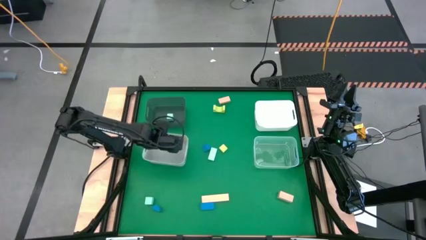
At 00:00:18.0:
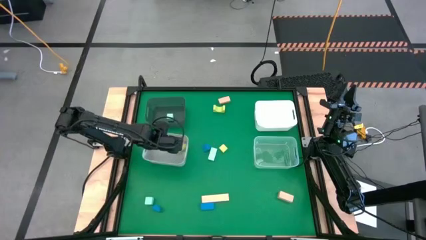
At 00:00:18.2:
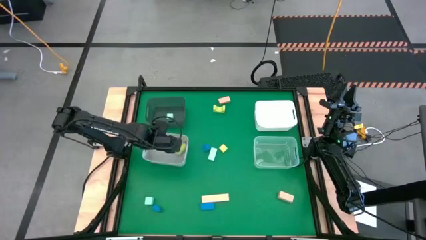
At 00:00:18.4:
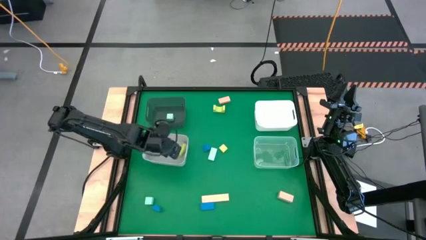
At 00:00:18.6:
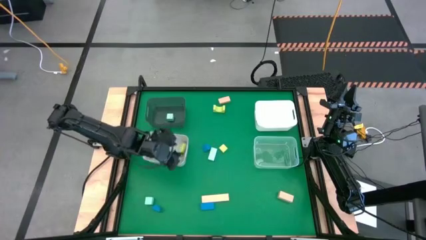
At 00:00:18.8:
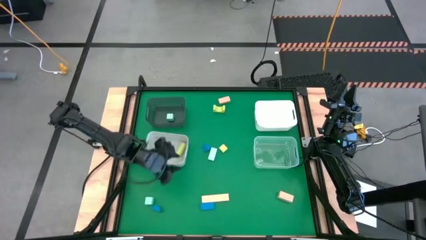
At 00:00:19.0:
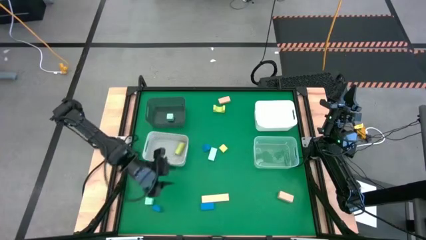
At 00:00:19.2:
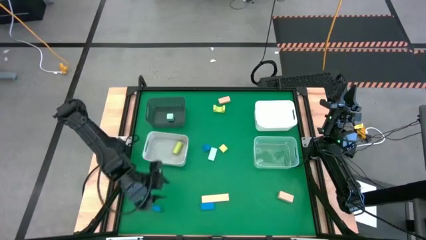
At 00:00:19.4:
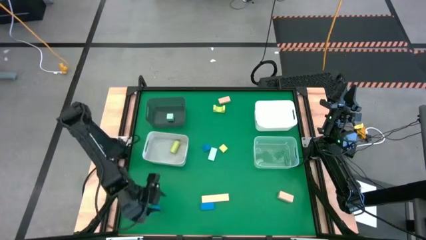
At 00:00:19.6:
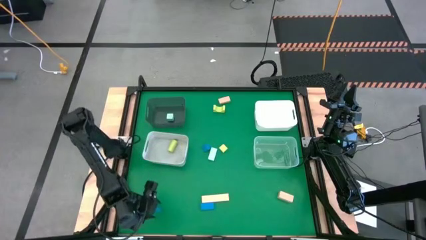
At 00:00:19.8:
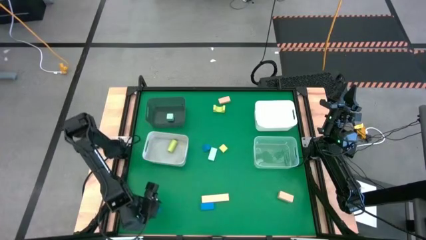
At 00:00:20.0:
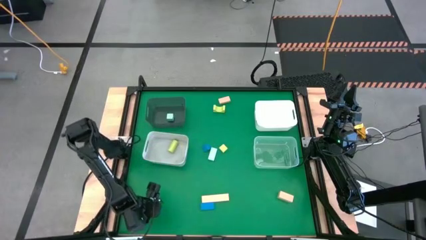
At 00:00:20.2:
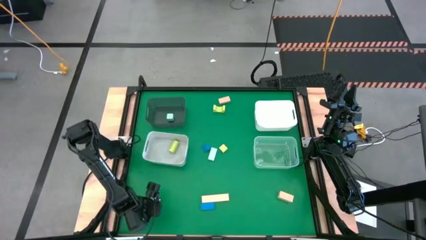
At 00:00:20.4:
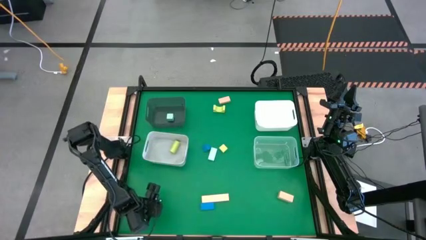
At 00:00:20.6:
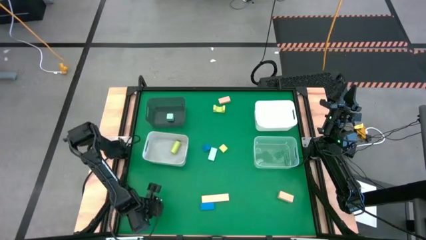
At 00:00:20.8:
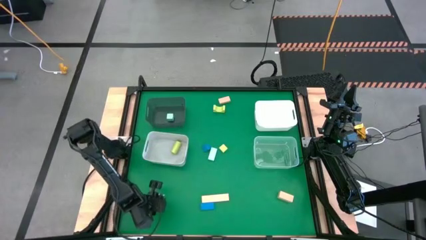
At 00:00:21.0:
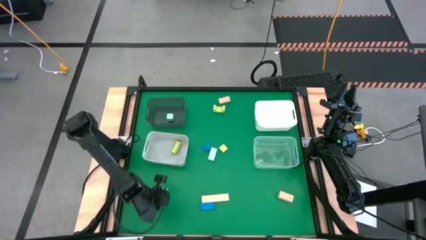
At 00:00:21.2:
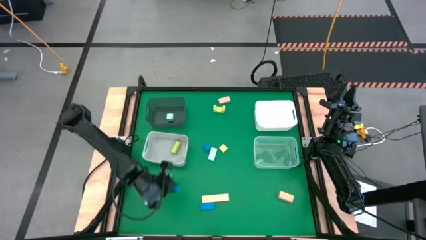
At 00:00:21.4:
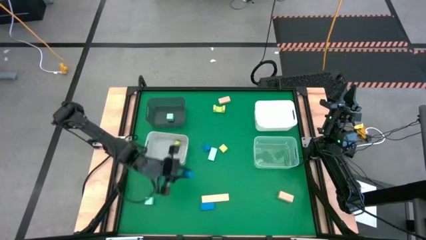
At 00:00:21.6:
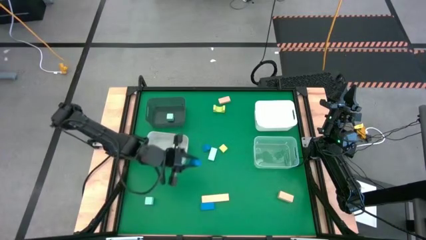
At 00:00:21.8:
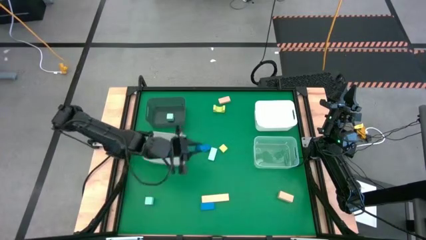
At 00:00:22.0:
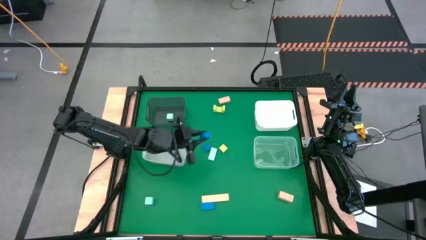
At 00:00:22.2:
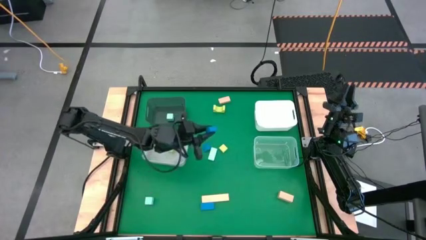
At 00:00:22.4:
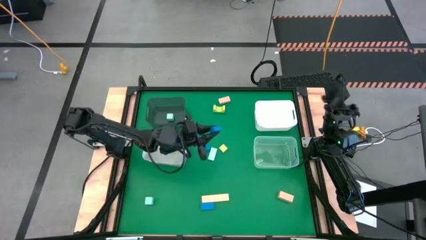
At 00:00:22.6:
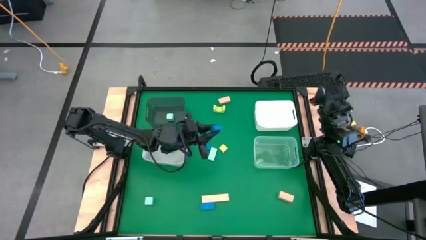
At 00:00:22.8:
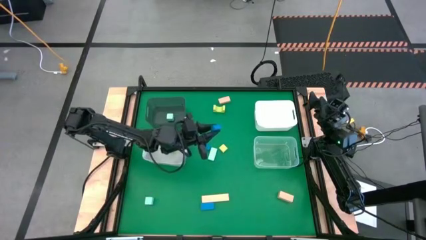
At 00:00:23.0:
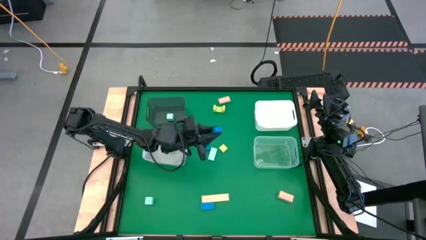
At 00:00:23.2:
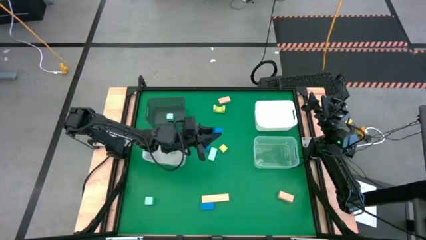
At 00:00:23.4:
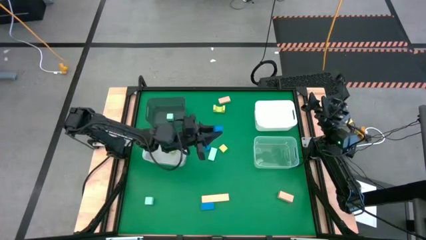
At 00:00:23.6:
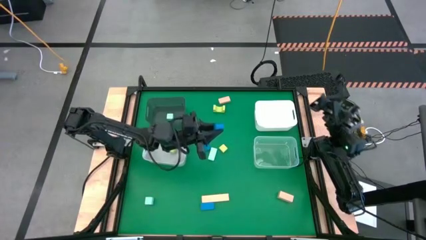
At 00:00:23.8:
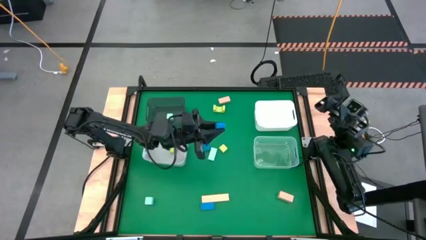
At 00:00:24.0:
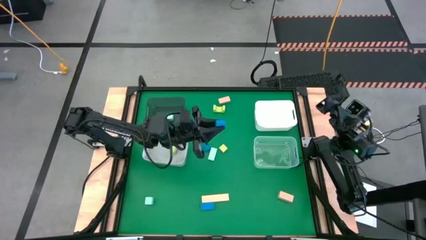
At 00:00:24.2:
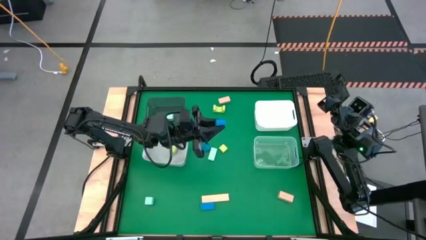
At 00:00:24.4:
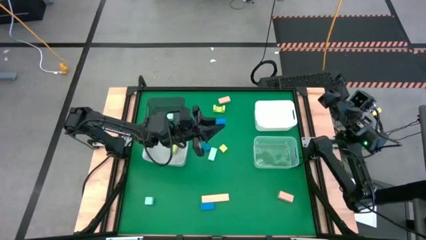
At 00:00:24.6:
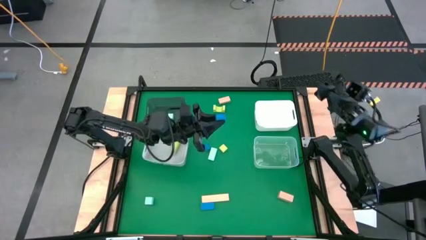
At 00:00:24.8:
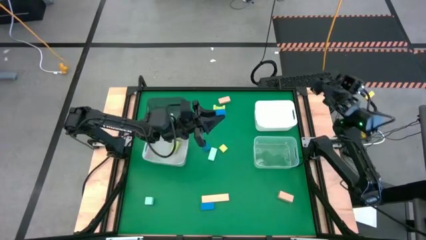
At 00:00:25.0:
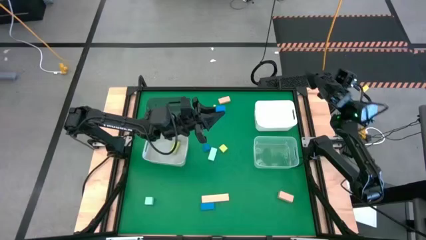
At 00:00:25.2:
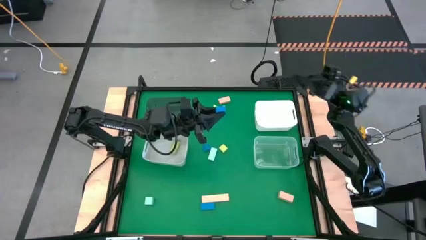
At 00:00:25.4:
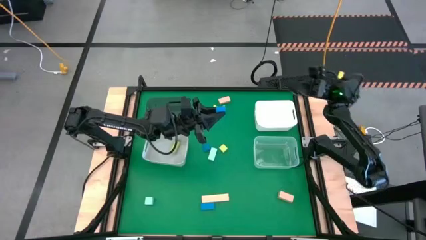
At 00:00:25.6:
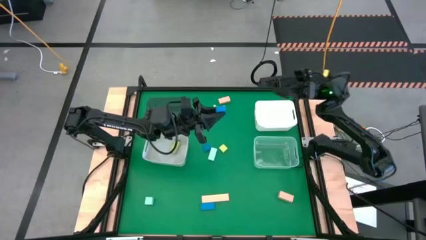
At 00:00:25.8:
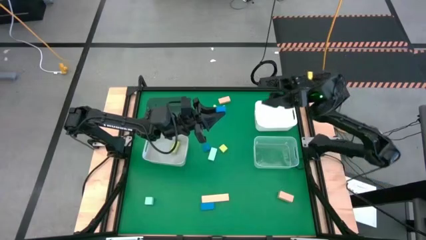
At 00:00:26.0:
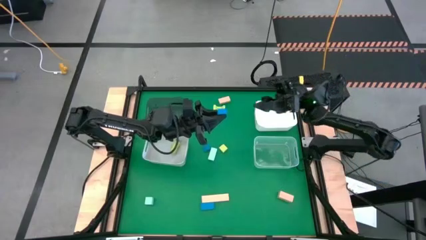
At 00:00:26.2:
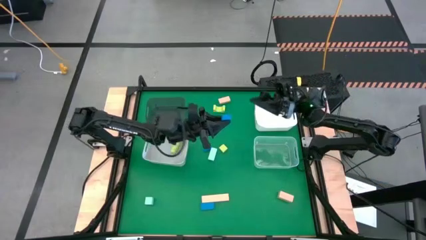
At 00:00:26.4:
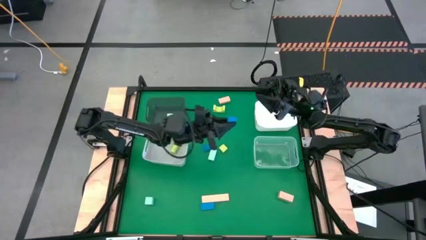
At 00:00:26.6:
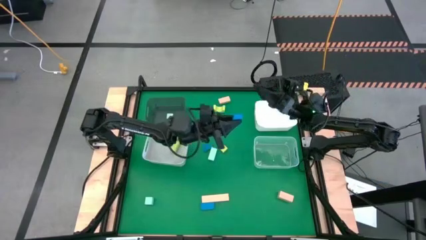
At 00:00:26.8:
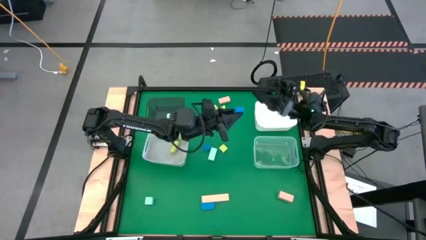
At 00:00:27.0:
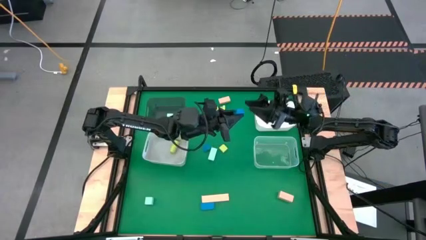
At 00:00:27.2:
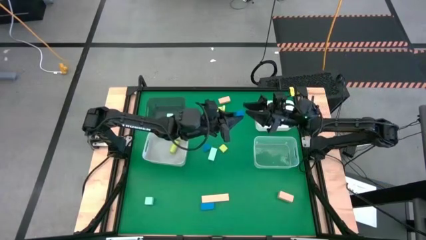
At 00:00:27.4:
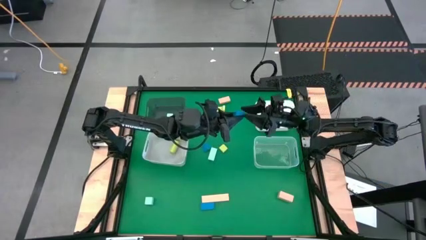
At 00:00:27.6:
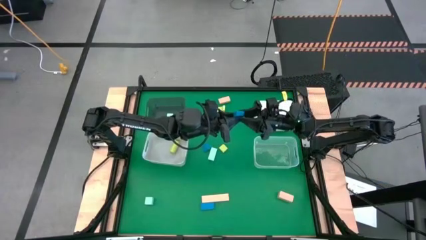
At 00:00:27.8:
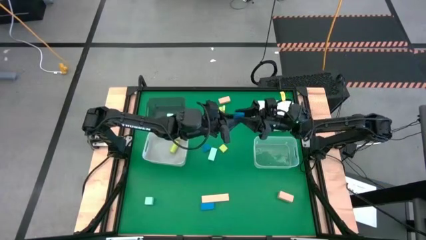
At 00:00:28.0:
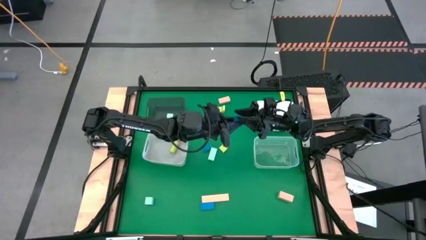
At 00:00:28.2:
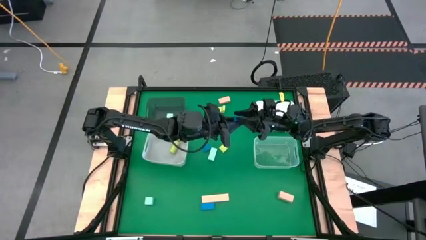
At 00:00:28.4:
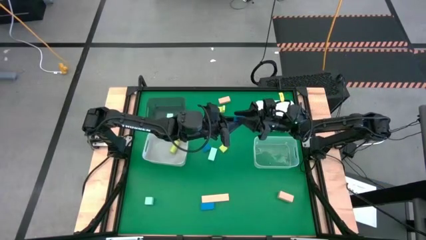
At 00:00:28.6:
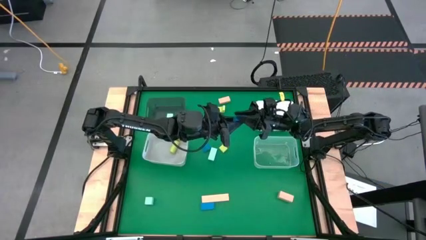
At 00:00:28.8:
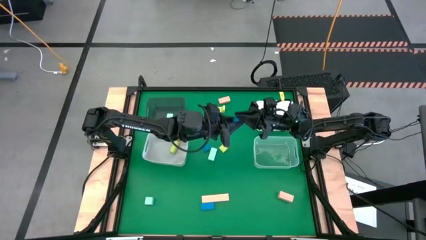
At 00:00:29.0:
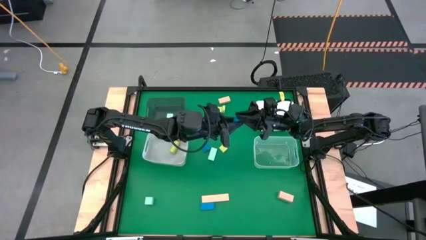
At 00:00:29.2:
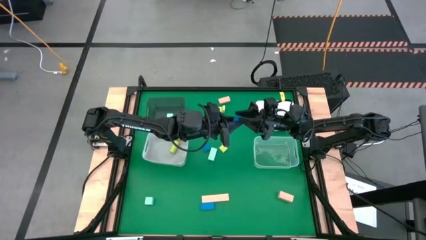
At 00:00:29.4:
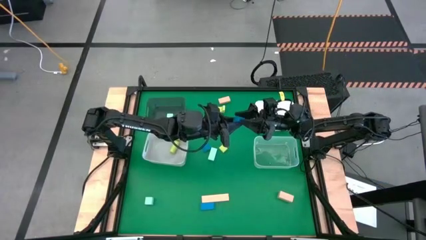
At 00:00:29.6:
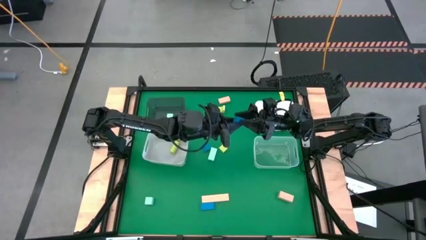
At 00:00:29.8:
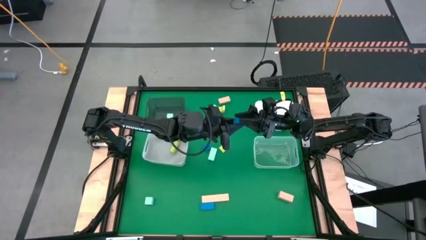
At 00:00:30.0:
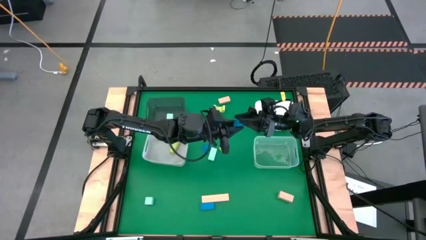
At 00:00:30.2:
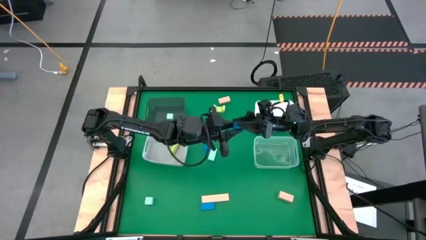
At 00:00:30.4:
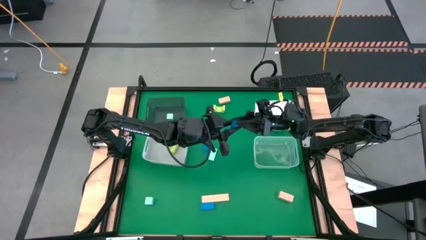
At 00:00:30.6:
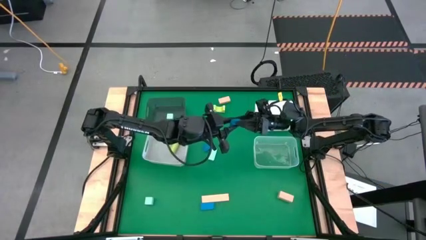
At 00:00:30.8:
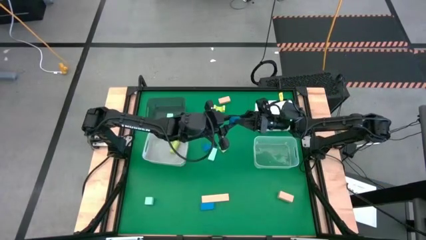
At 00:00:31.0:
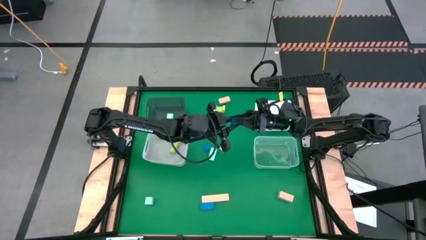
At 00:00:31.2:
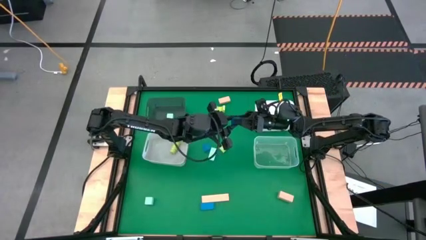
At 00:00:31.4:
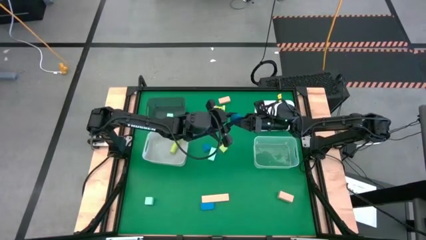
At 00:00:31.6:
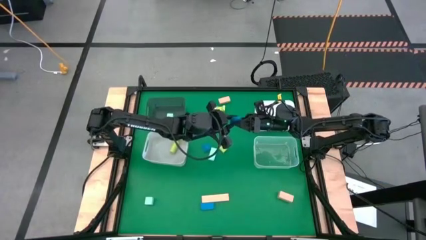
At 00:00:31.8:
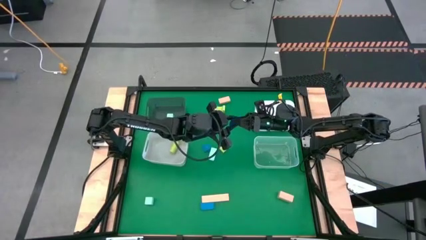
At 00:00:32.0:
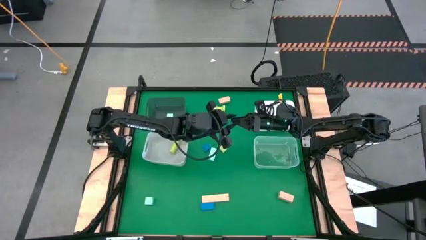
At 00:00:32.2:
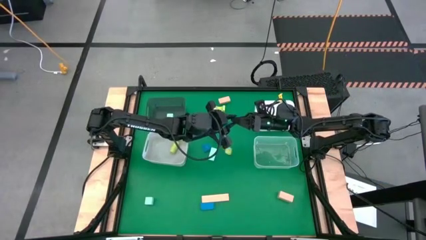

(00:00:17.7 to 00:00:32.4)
Task: Sort & place blocks by color
Put the bottom left blue block into the white bin
